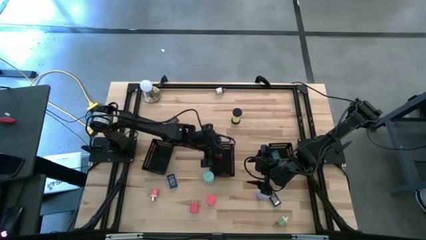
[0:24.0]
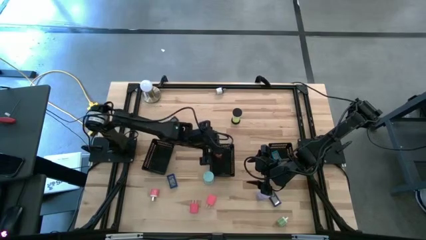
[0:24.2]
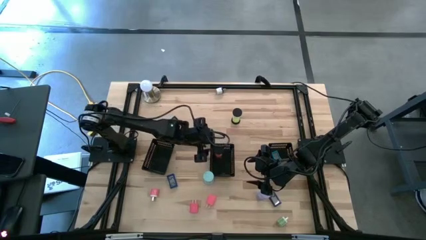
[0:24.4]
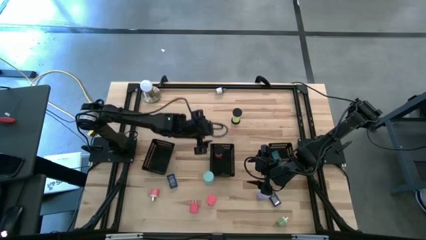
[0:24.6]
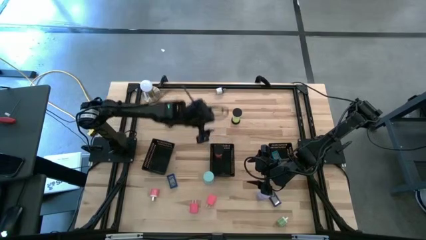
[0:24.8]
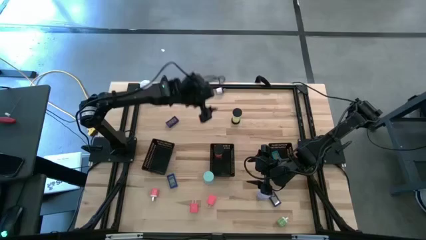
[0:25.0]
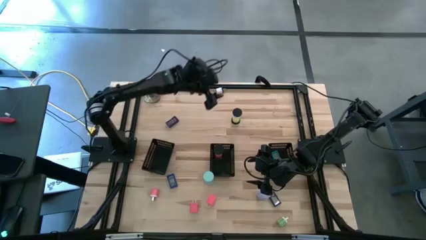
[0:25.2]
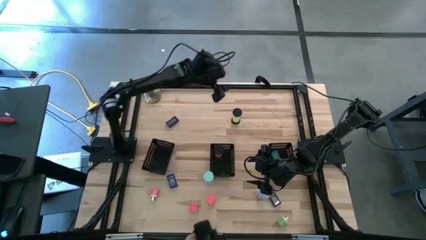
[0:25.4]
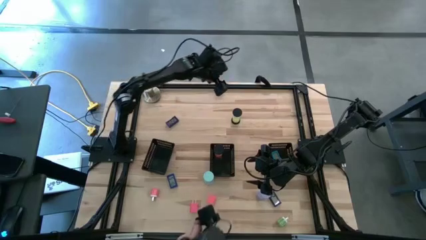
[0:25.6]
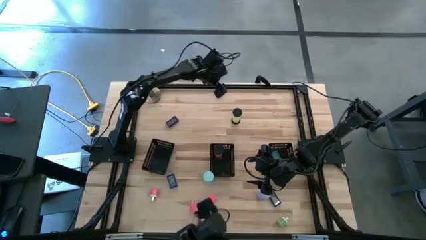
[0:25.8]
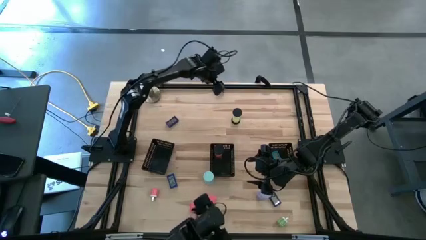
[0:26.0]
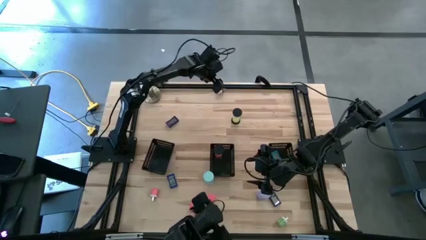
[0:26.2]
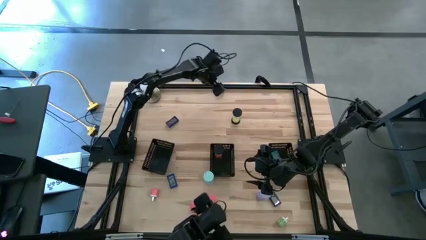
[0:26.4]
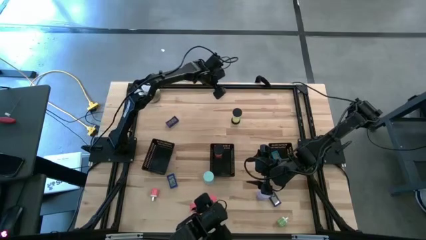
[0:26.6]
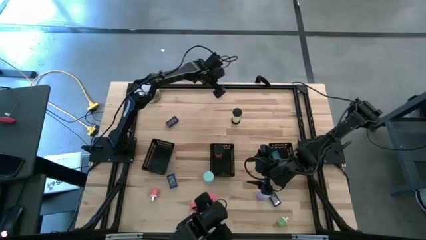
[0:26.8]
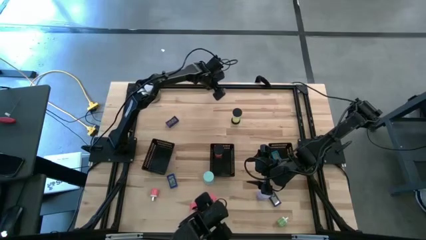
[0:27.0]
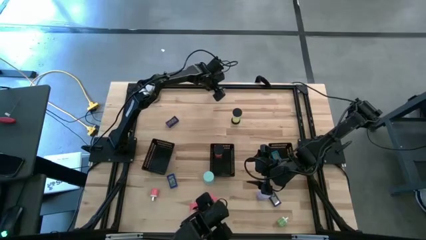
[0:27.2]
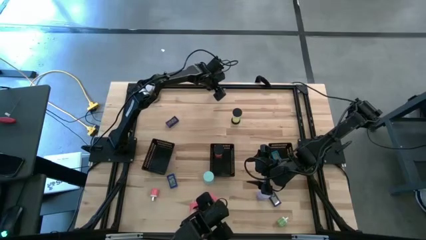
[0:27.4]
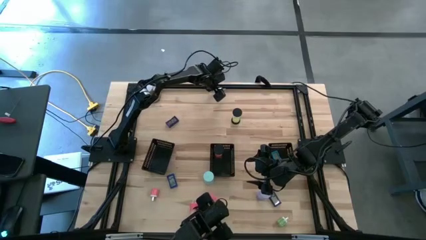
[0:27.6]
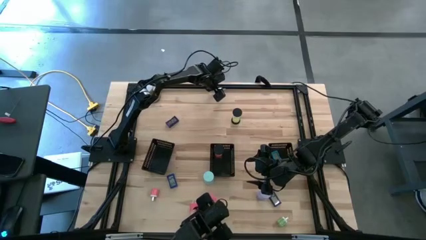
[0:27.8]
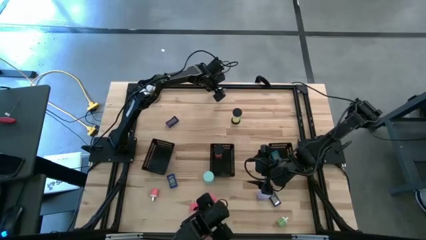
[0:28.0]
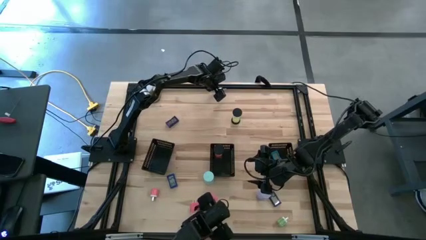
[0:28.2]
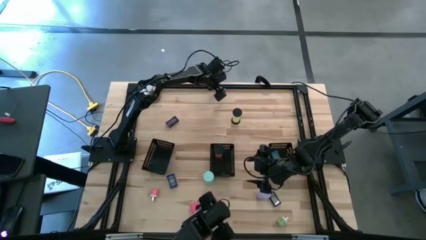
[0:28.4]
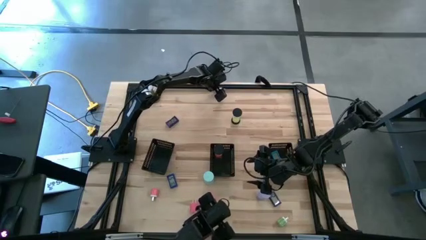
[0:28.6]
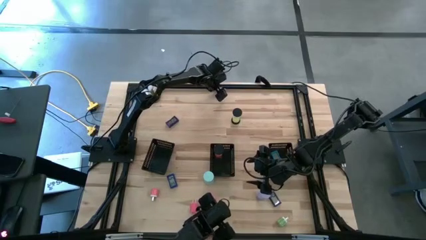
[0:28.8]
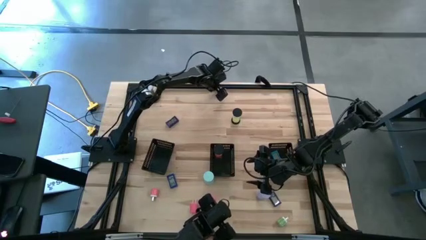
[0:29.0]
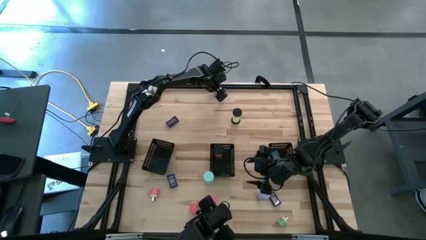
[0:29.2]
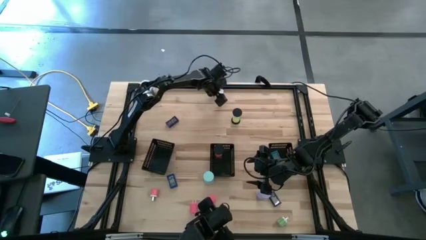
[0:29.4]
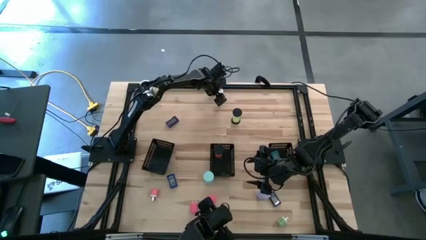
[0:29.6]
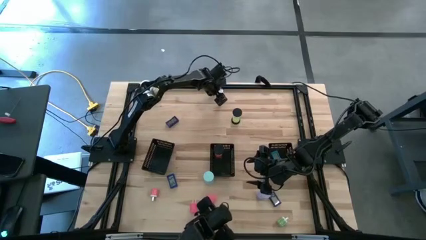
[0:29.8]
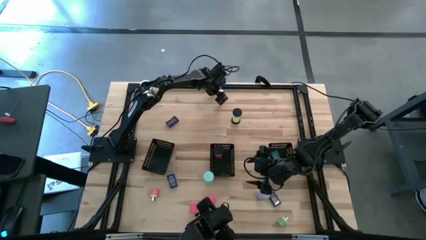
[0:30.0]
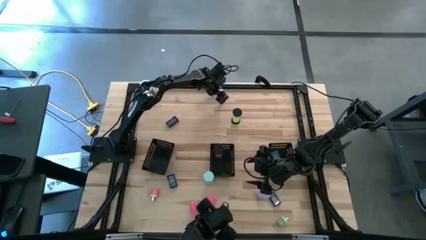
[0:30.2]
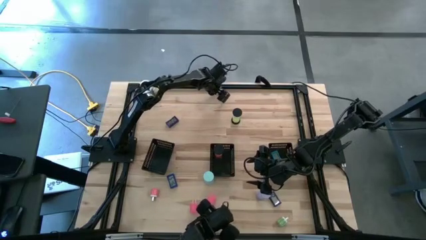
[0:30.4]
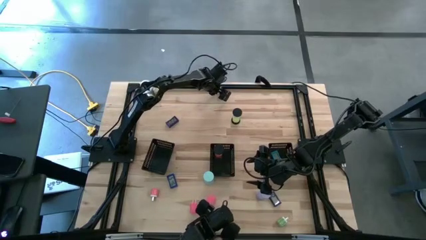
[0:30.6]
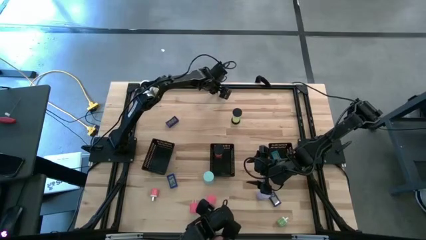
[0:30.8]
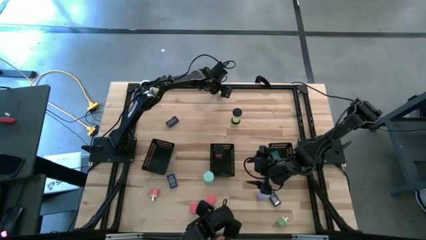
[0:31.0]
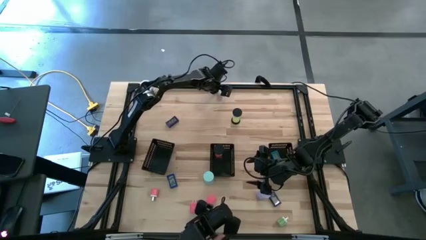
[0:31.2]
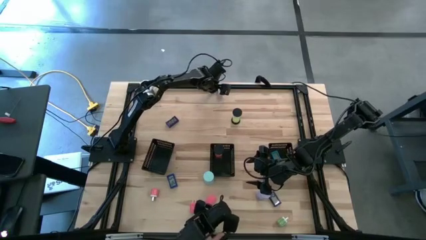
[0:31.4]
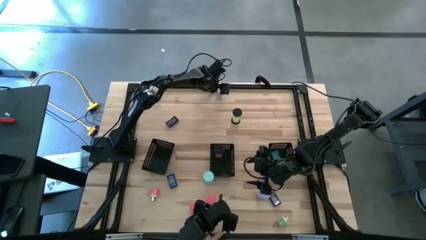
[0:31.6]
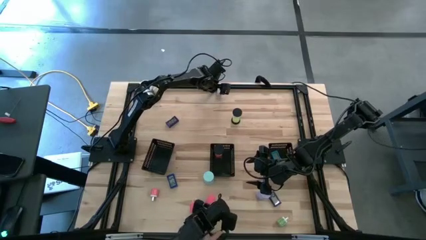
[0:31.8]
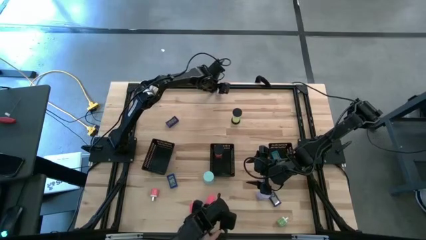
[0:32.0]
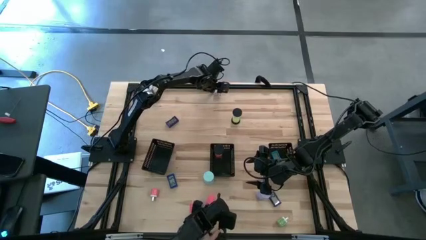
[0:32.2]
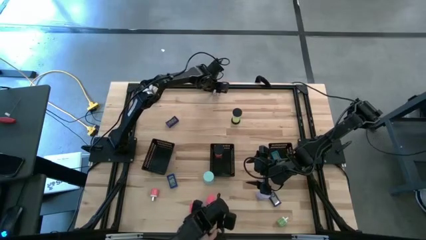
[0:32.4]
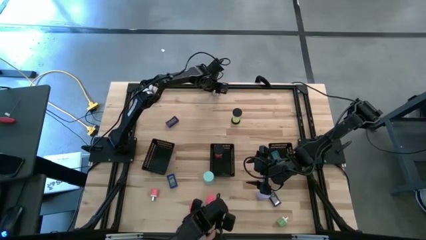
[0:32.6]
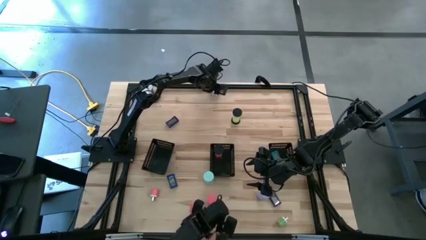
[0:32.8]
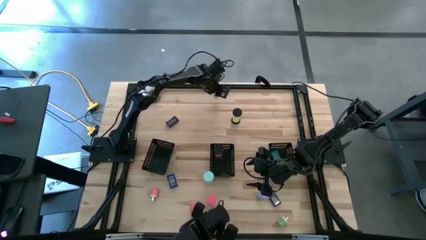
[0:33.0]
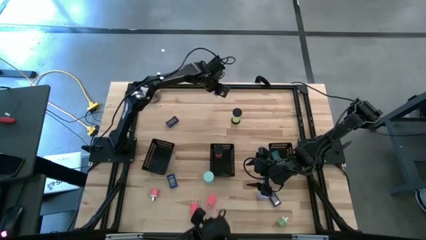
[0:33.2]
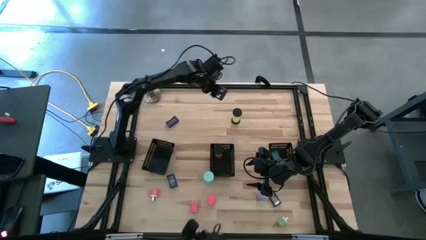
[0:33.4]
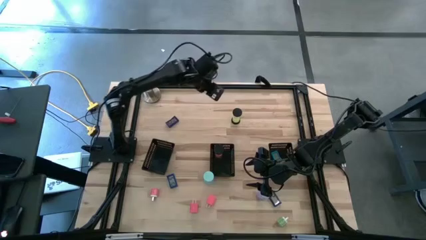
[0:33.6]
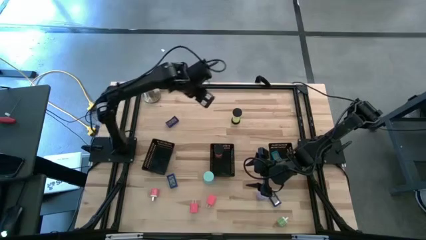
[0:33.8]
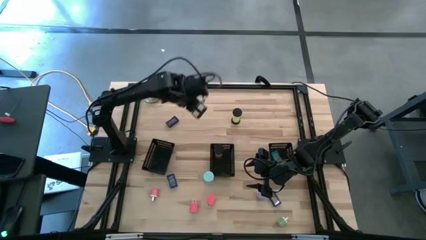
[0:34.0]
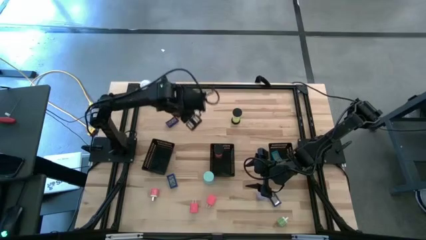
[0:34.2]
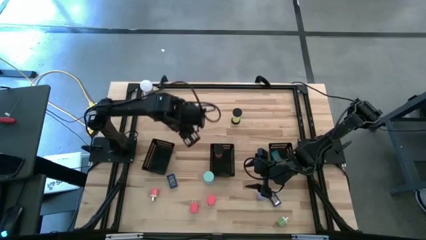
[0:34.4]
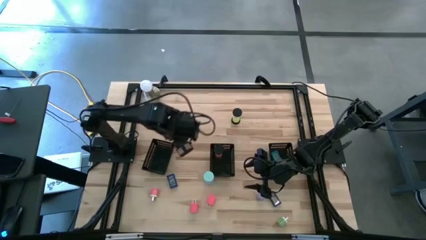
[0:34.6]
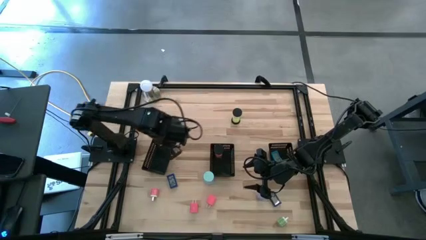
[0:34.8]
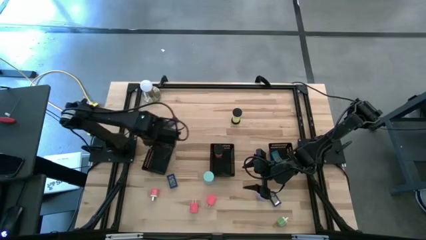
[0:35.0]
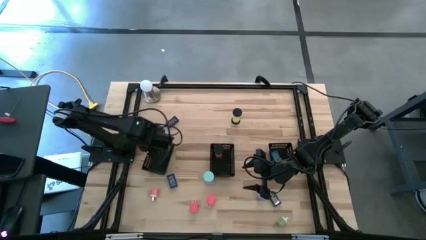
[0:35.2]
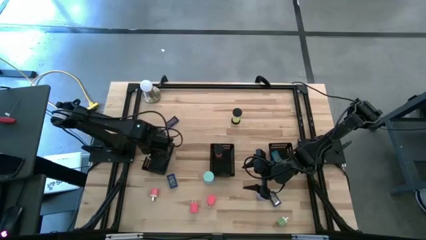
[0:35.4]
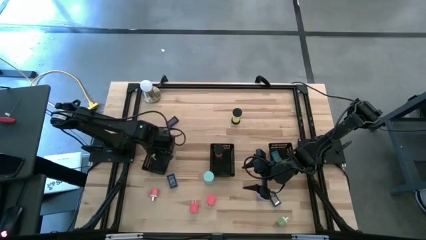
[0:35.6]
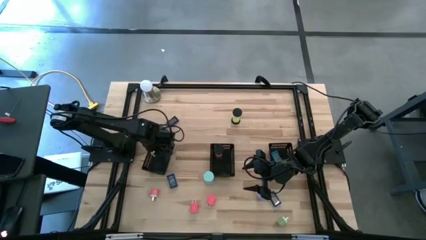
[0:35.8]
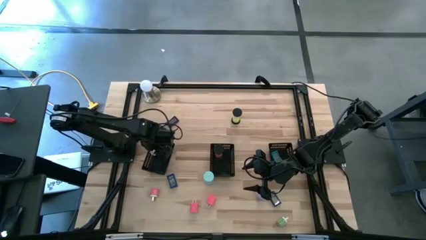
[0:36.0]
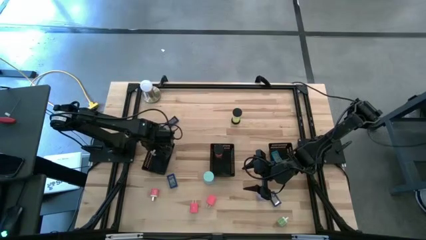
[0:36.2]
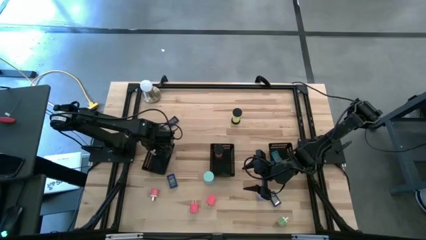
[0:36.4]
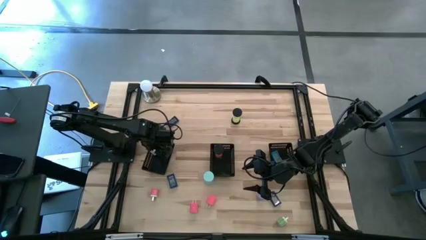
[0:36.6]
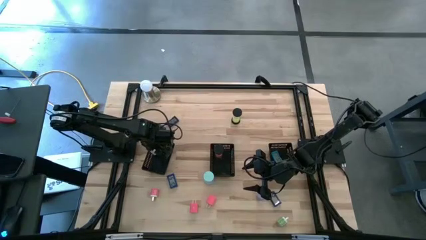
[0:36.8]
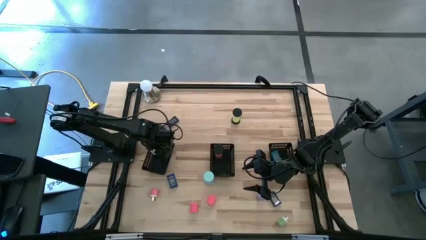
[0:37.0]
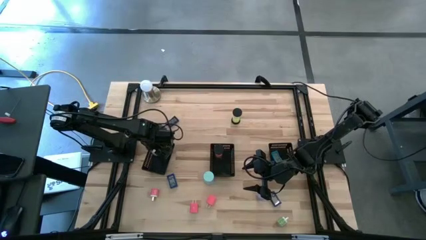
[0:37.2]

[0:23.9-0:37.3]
Task: Pick & Place Office items
Put the white charger adapter into the left black bin

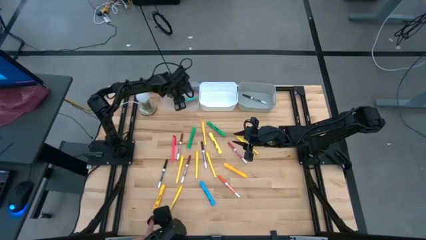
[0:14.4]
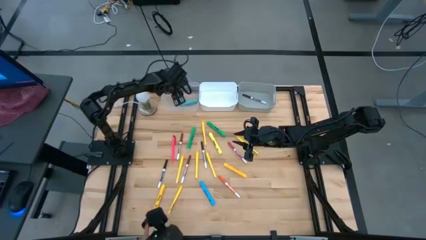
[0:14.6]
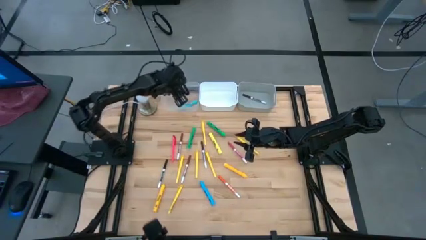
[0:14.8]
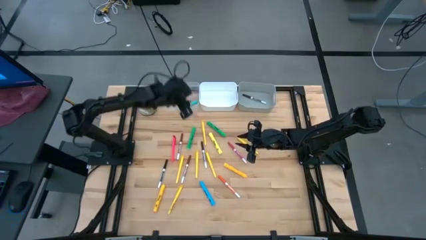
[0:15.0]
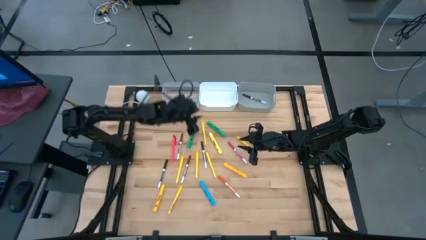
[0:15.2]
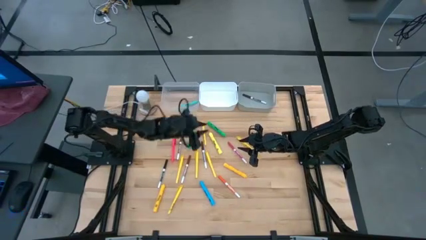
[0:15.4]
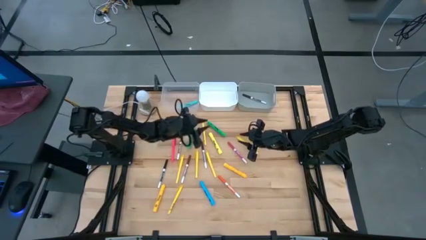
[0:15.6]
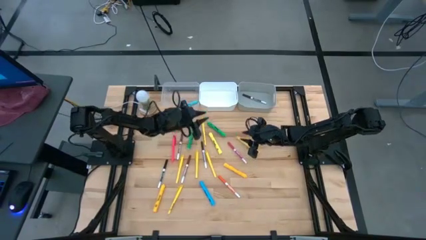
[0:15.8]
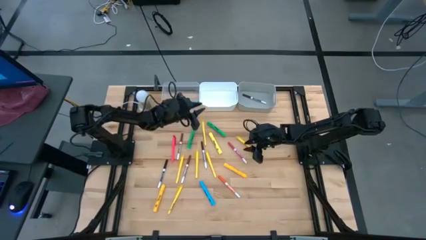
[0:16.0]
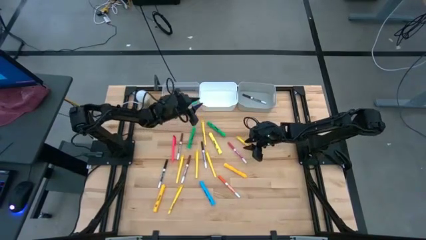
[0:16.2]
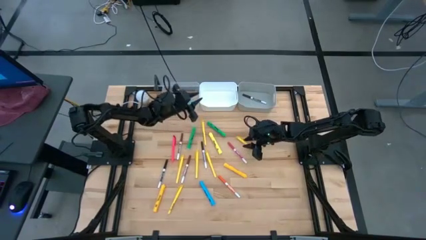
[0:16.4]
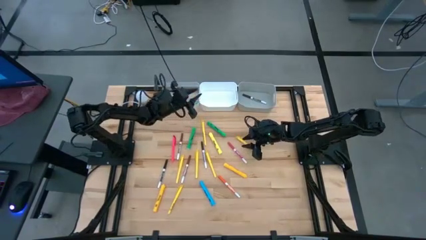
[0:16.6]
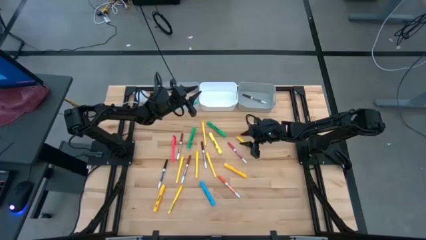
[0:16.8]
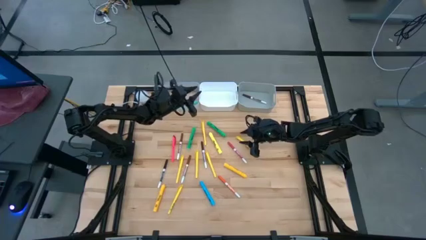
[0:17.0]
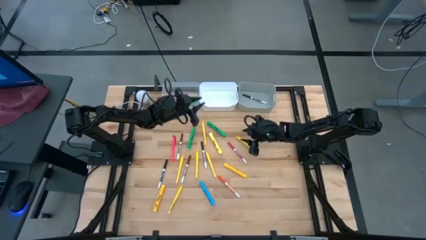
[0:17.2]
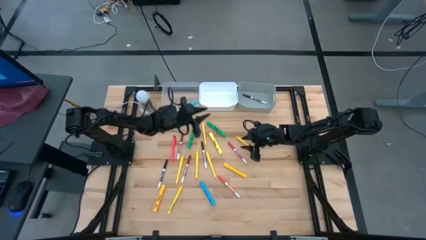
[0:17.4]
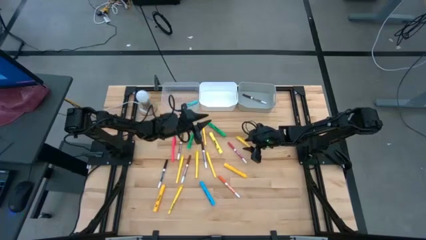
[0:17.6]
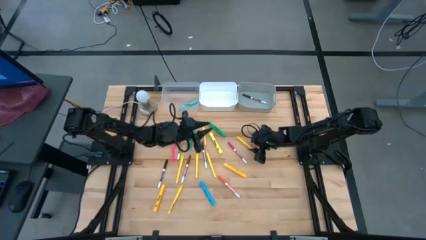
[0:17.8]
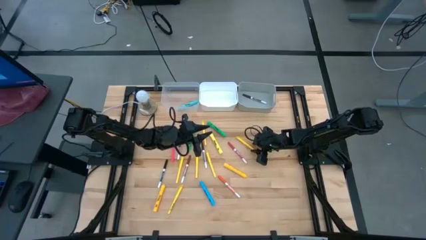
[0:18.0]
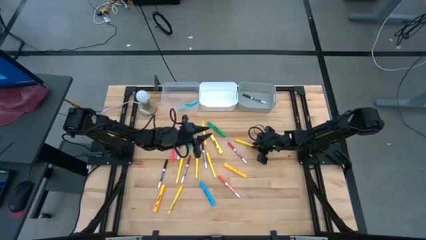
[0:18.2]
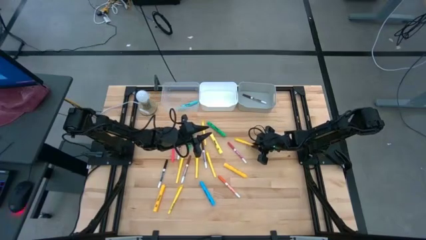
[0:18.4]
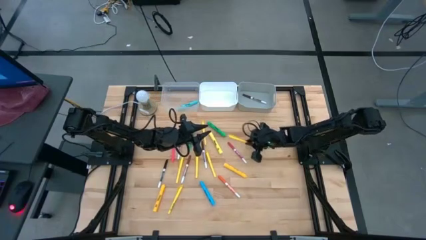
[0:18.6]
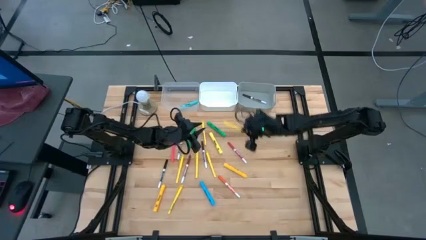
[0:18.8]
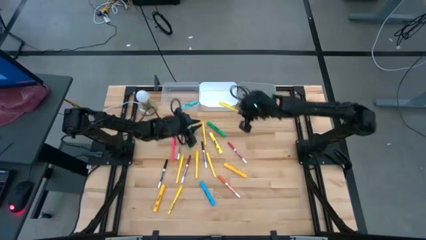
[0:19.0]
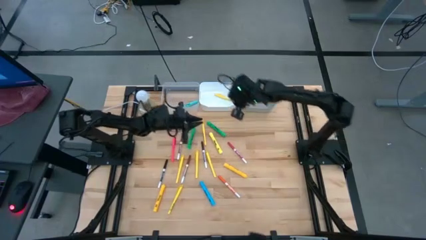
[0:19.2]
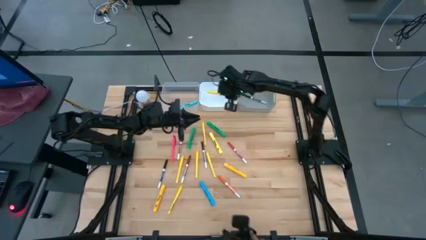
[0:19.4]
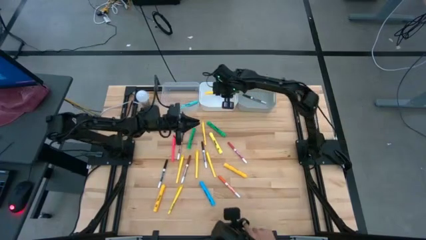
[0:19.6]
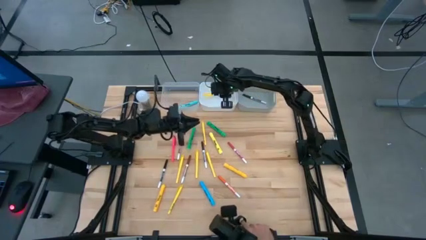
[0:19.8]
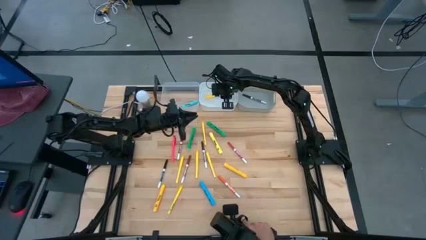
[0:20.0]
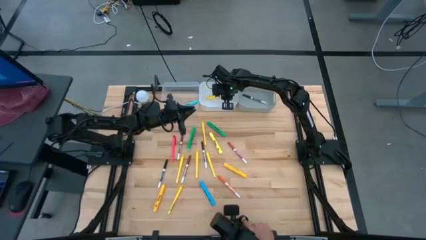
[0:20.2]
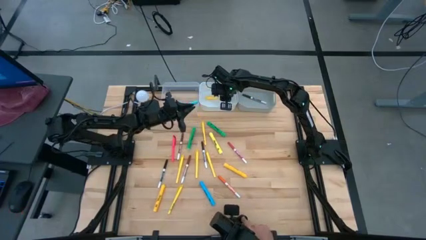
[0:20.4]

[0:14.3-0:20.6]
Task: Pick & Place Markers
Put the yellow pen into the white bin
